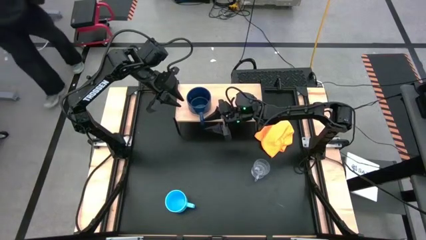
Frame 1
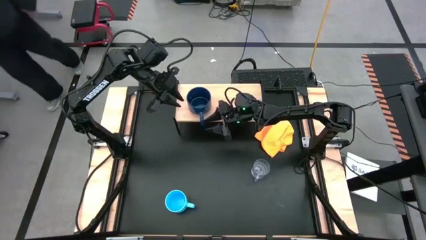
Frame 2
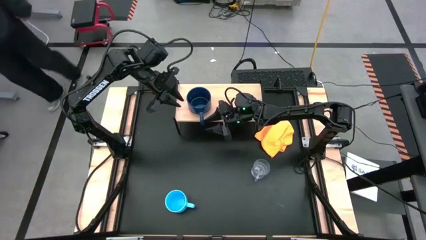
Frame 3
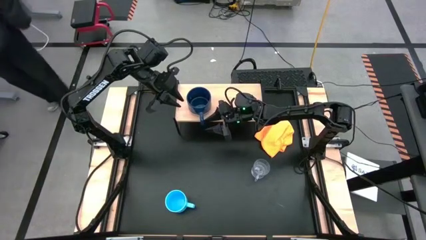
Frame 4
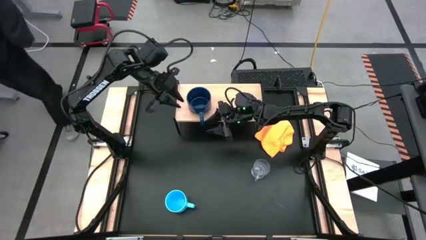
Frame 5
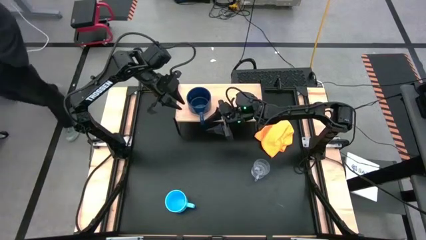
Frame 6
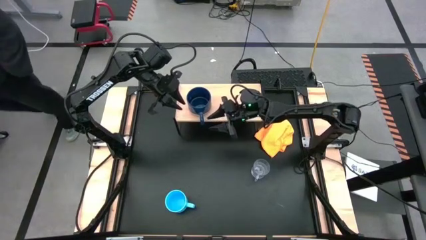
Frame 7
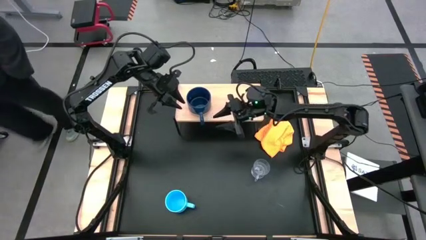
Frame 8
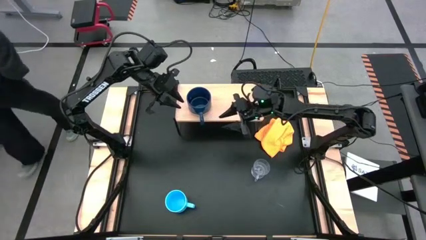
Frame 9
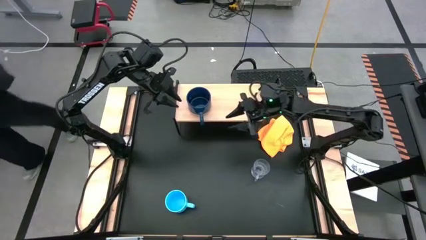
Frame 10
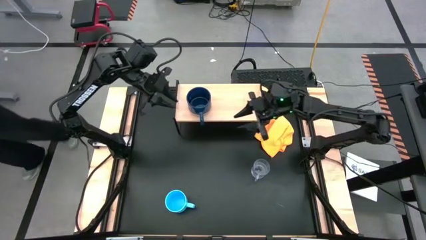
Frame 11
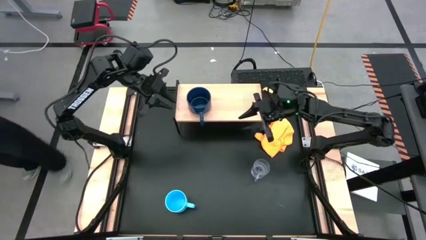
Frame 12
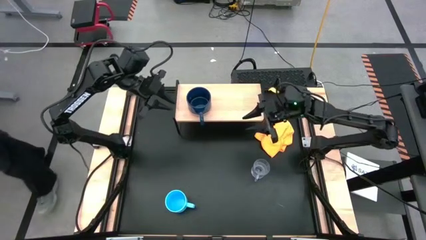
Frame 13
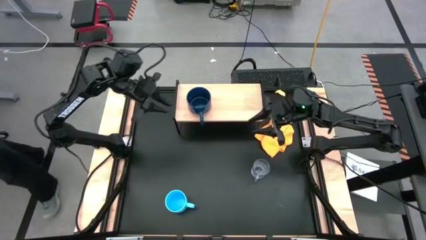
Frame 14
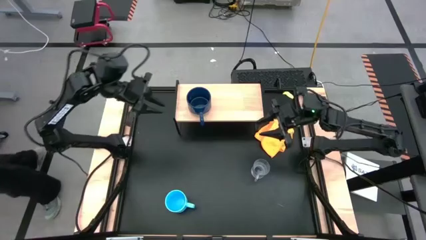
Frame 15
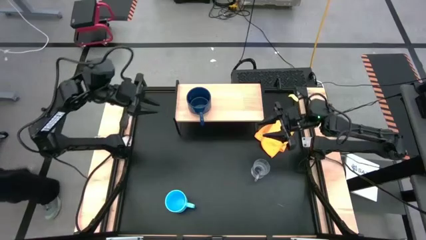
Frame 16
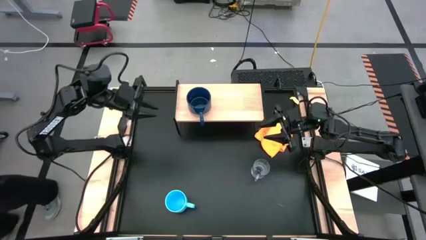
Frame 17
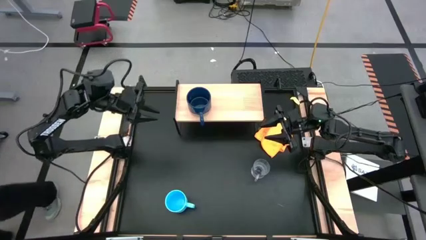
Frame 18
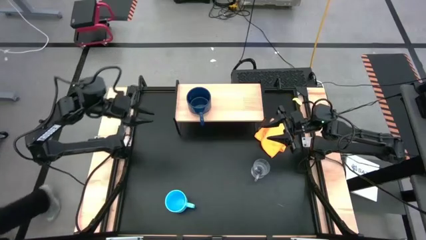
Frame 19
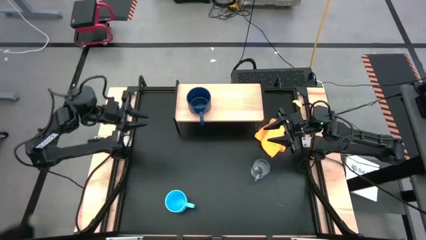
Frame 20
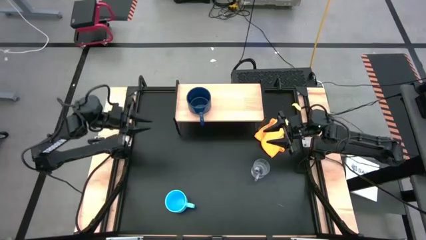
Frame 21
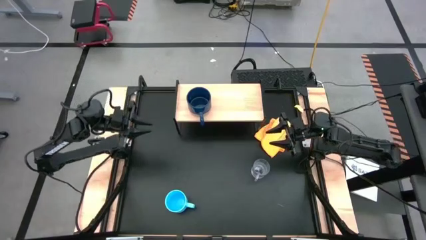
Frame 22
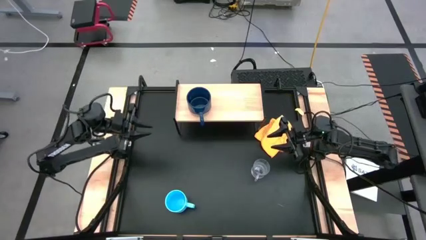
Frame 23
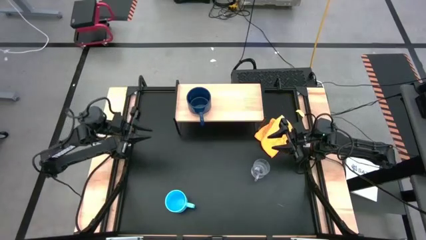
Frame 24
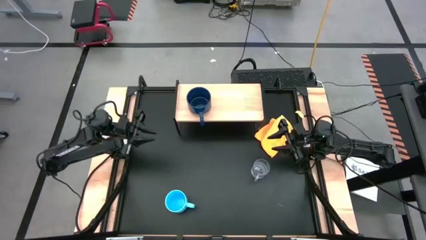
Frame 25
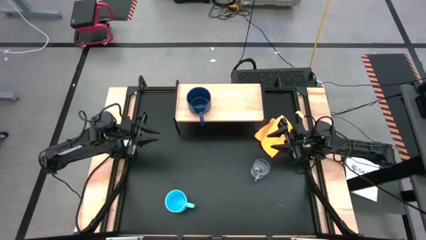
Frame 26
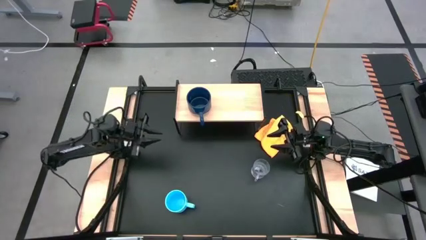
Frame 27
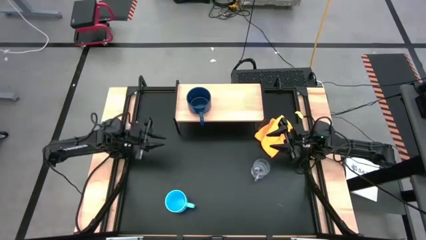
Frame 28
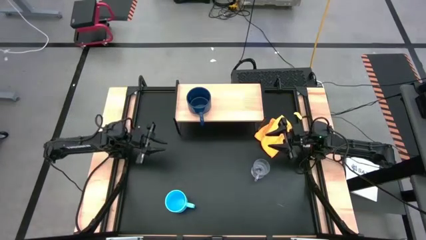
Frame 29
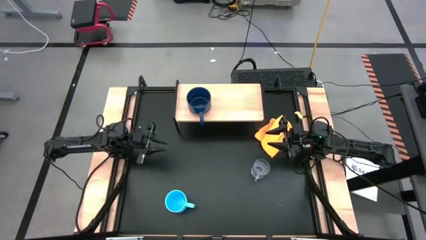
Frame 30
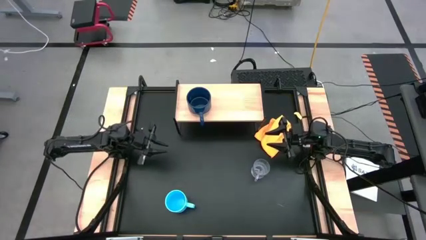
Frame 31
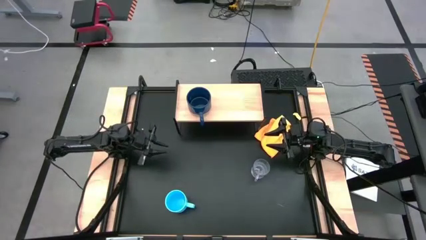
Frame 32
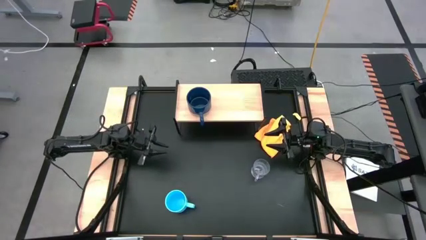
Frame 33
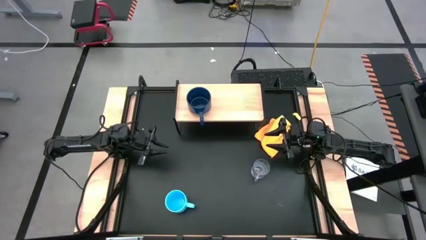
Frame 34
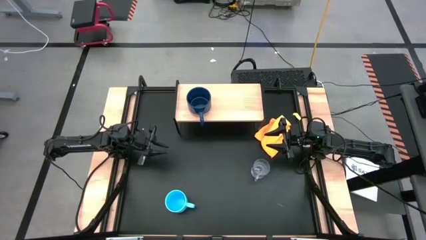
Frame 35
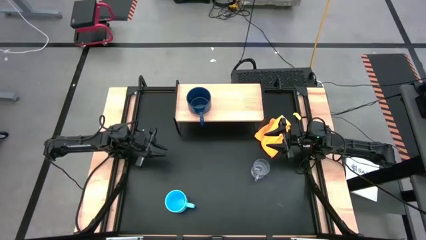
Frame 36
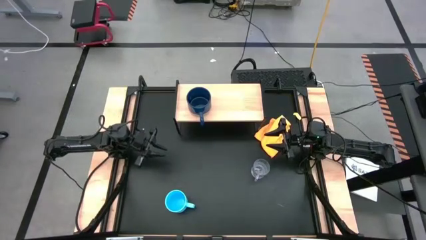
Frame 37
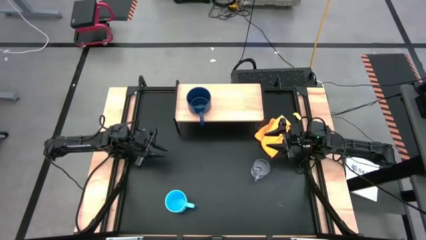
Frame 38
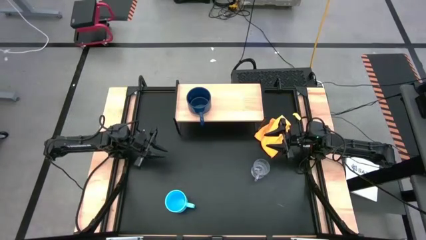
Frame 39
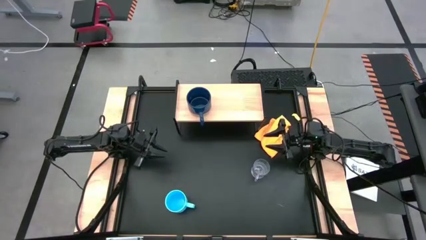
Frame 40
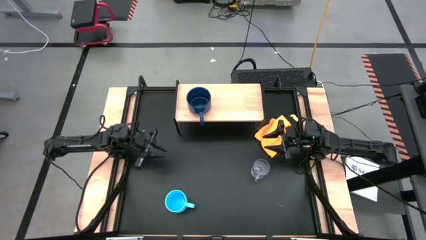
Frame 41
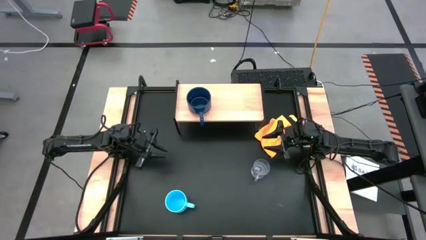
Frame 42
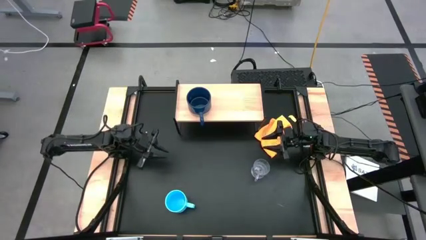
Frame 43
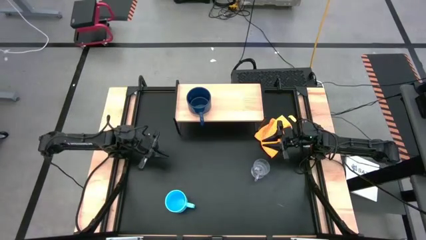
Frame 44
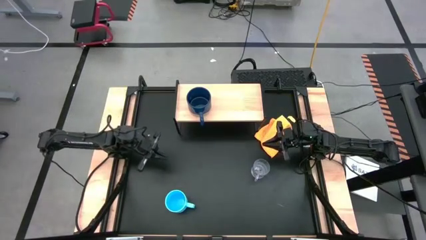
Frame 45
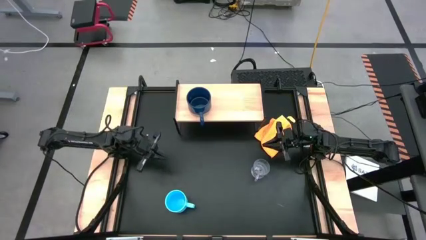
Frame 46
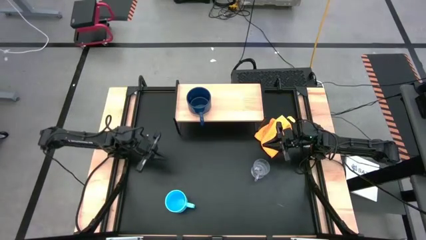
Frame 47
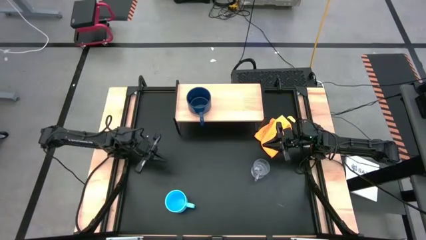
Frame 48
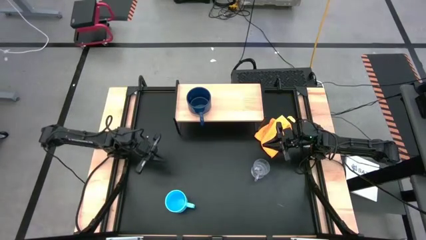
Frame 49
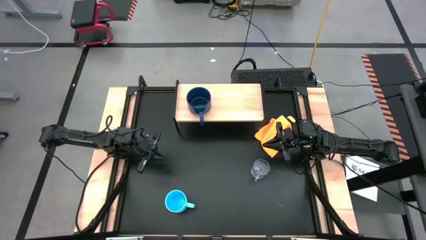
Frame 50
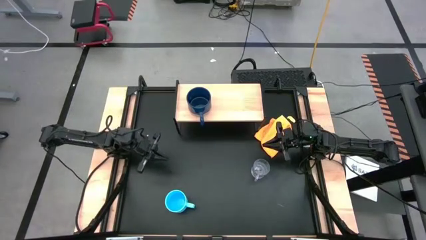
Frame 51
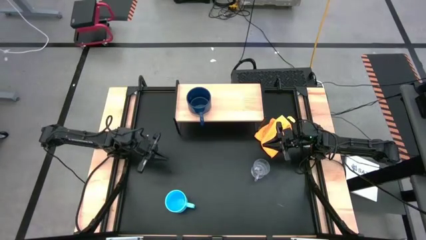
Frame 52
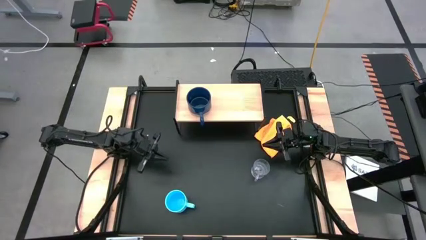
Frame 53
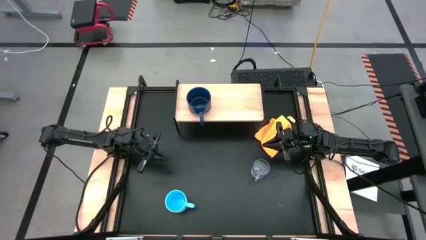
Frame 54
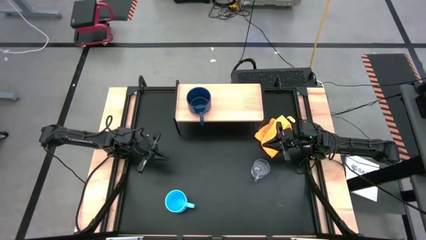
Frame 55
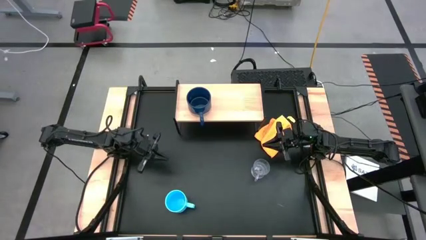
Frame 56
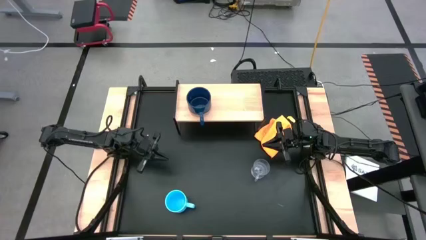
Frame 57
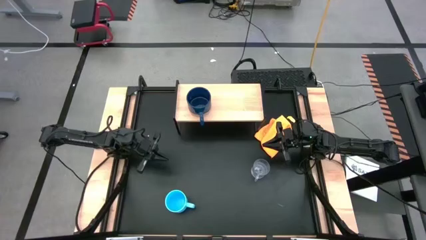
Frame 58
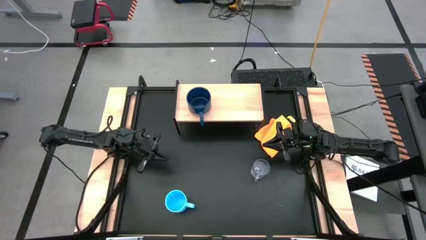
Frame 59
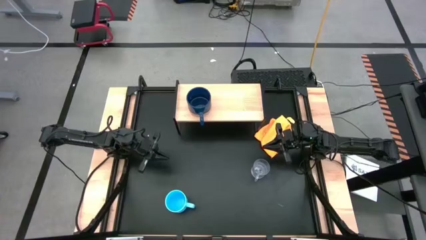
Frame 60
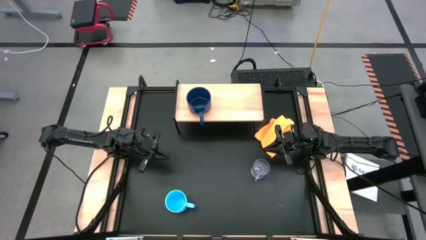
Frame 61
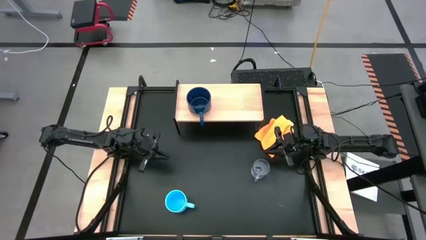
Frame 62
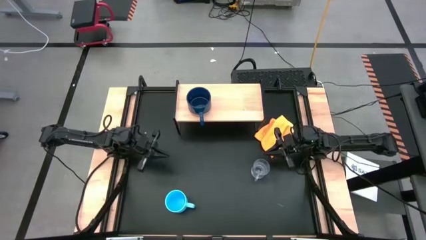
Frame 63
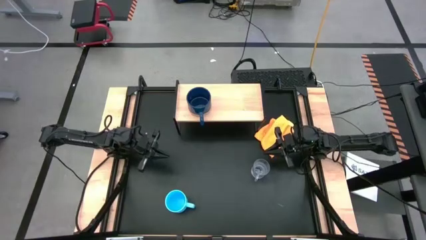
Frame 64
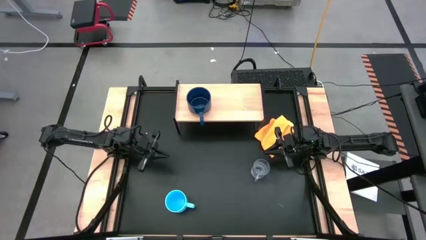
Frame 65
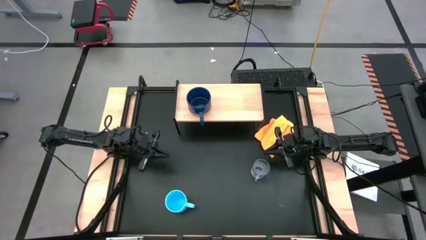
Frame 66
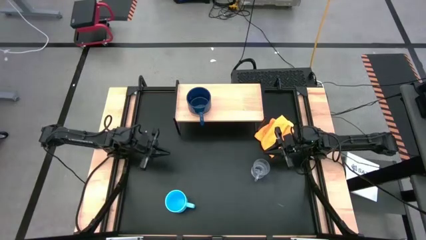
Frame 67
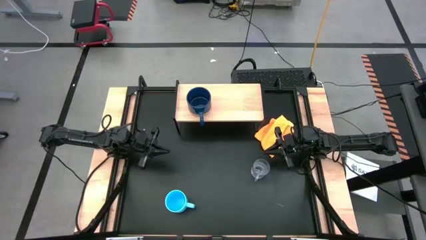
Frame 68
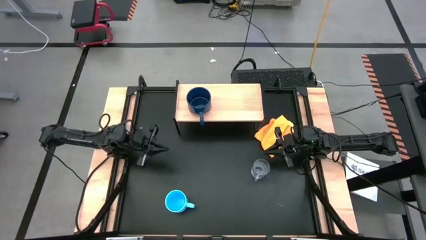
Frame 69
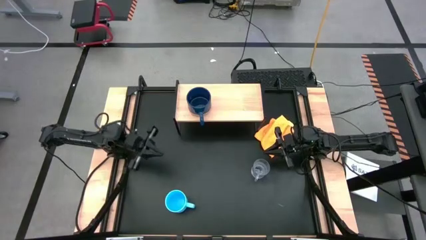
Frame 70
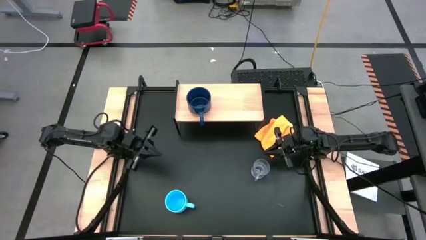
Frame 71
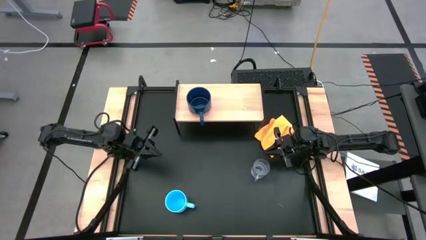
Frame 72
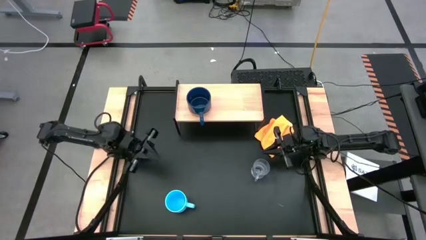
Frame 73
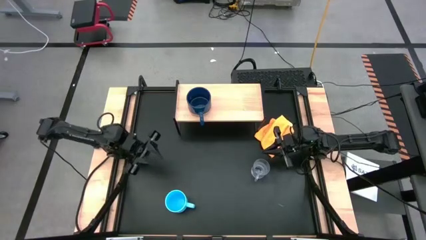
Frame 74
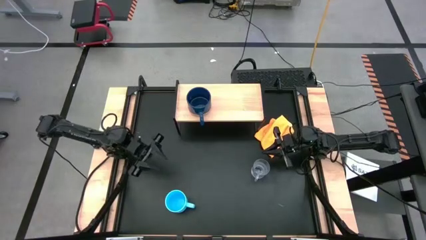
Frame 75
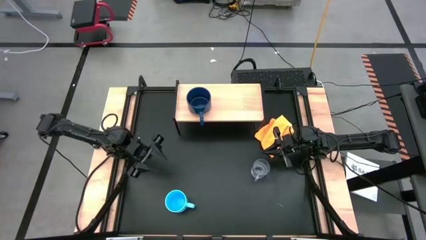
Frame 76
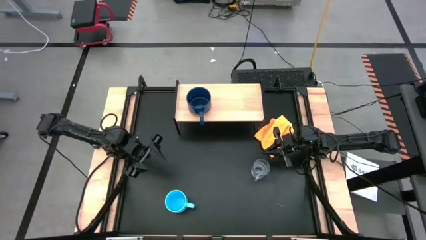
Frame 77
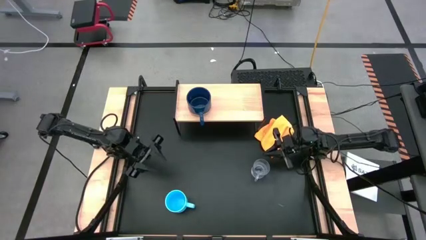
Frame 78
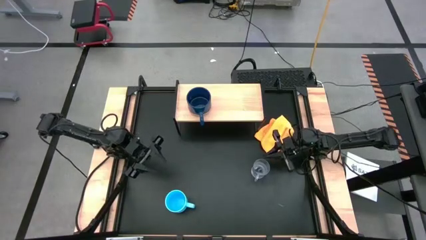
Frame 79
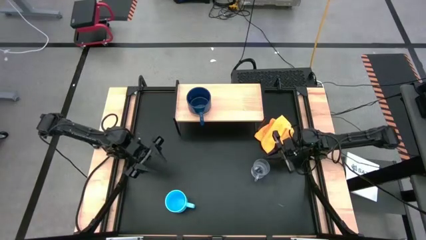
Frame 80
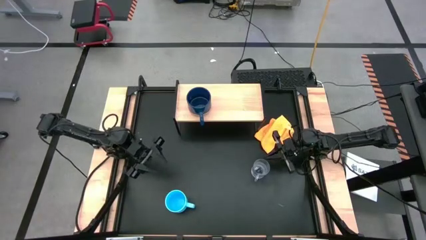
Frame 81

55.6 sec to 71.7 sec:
Task: Stack small to large cups/mugs on shelf
Put the blue mug on the shelf
